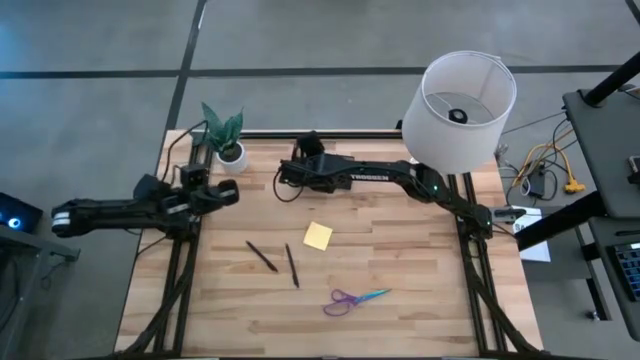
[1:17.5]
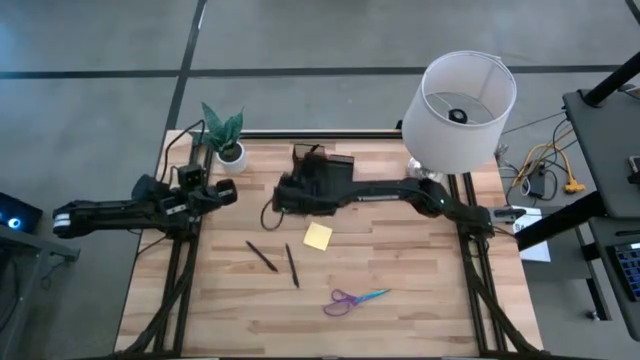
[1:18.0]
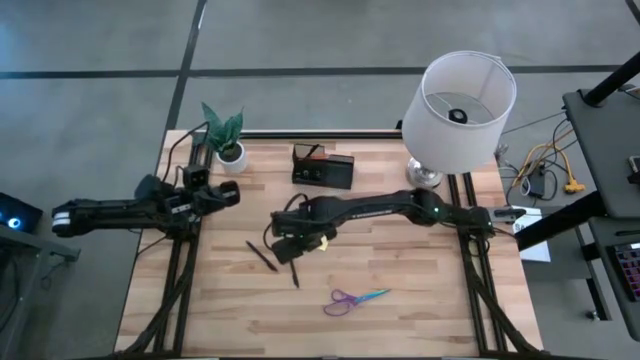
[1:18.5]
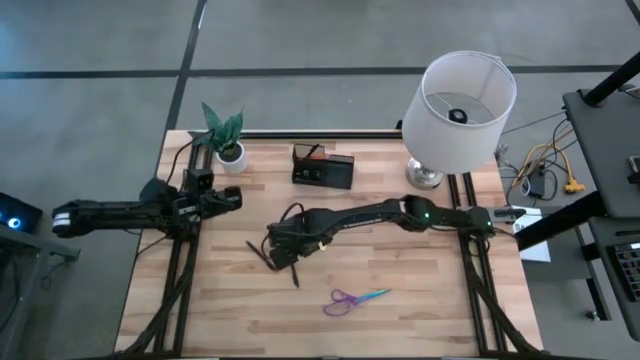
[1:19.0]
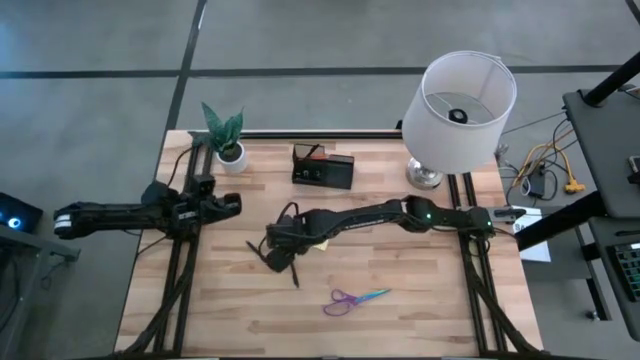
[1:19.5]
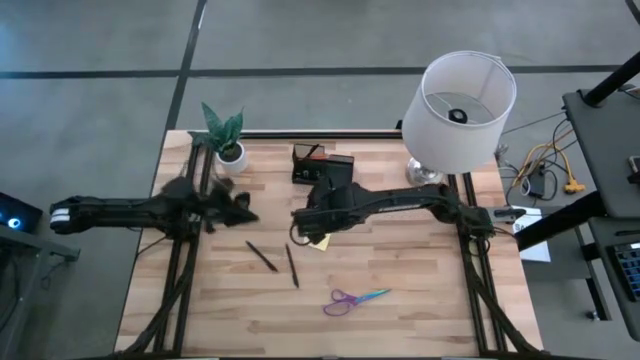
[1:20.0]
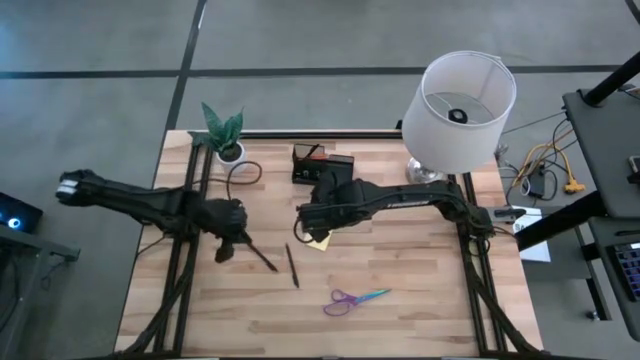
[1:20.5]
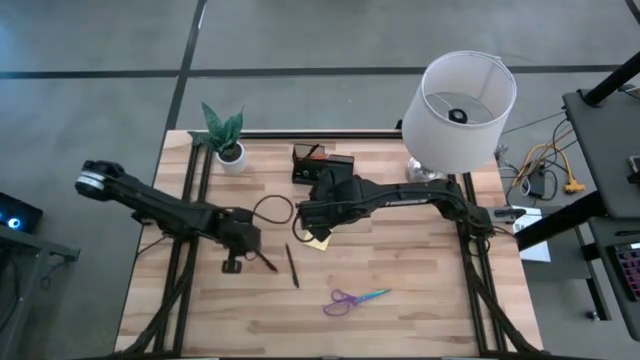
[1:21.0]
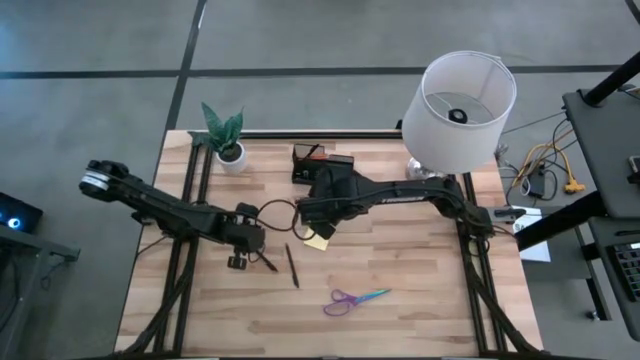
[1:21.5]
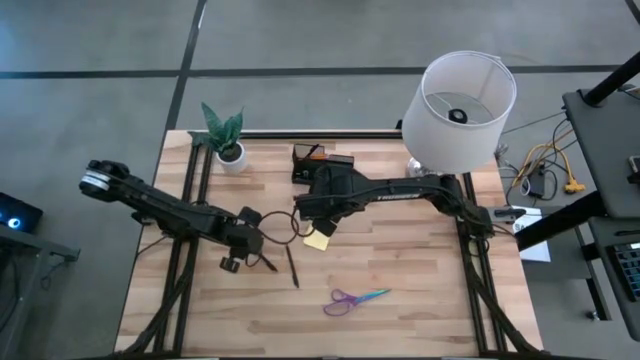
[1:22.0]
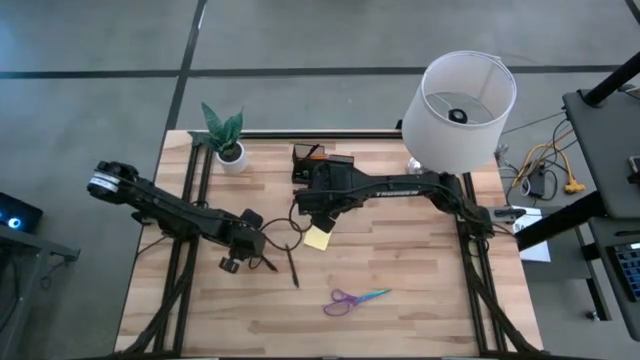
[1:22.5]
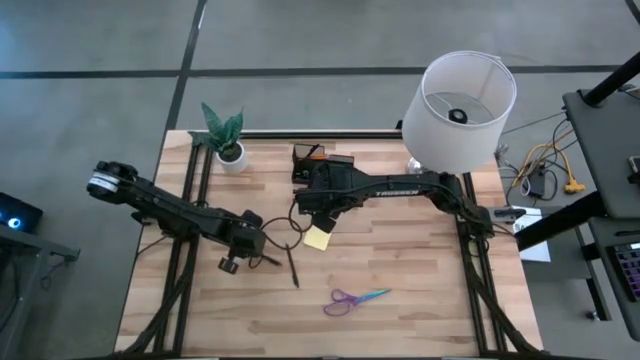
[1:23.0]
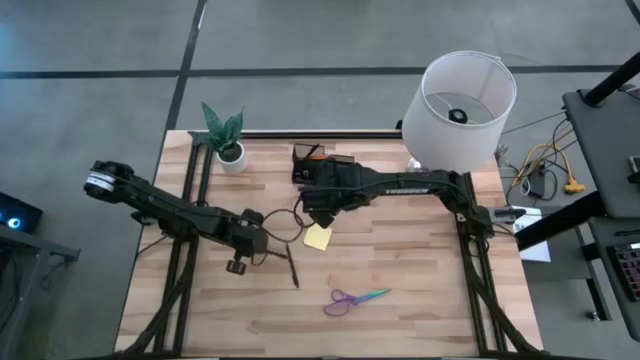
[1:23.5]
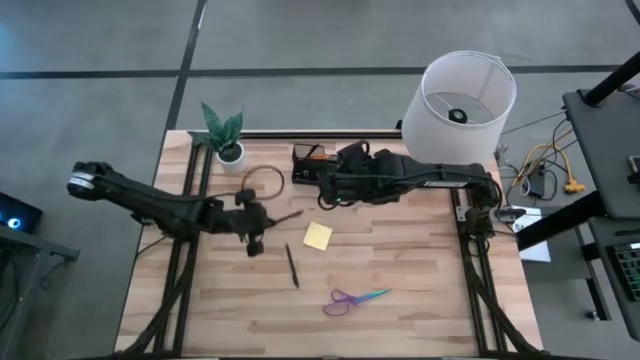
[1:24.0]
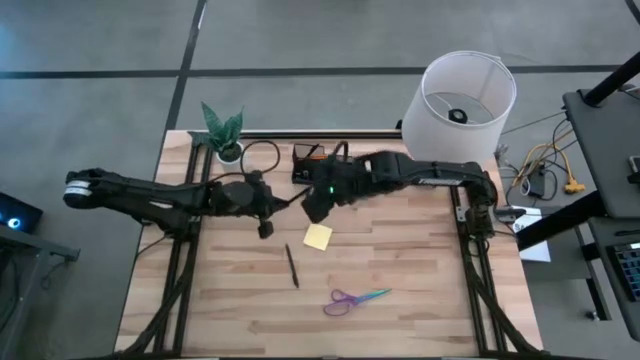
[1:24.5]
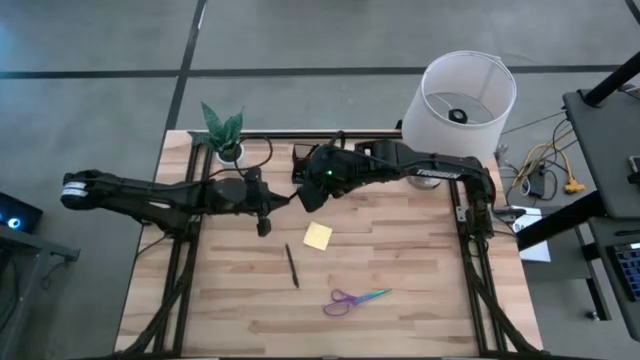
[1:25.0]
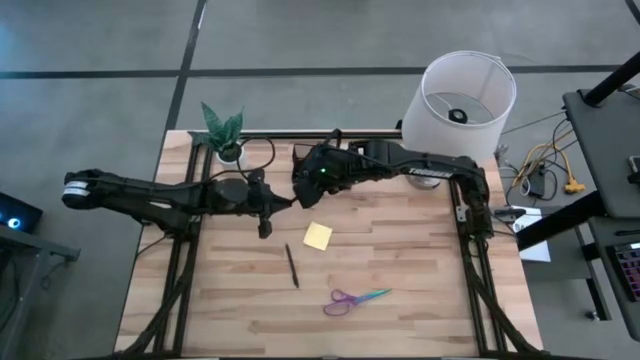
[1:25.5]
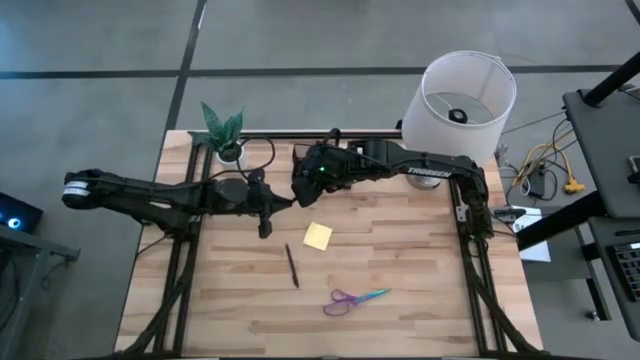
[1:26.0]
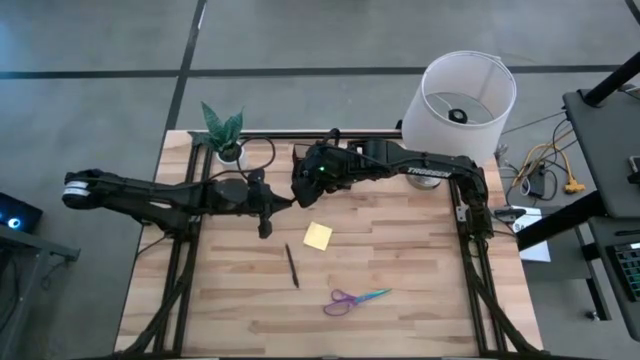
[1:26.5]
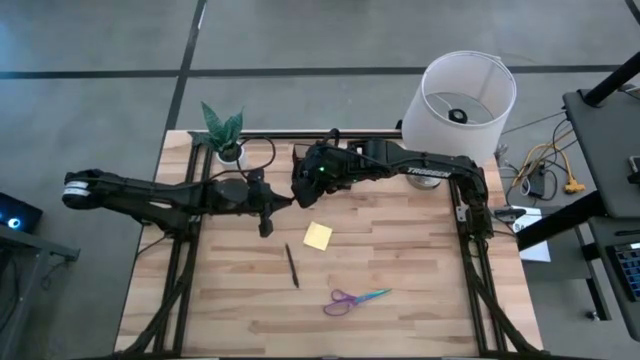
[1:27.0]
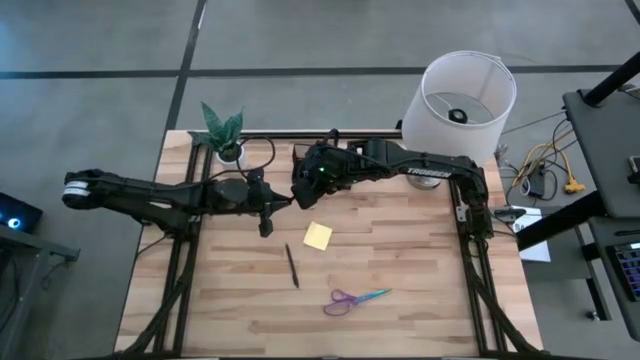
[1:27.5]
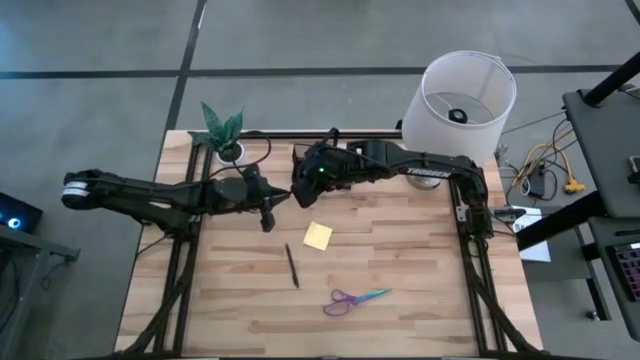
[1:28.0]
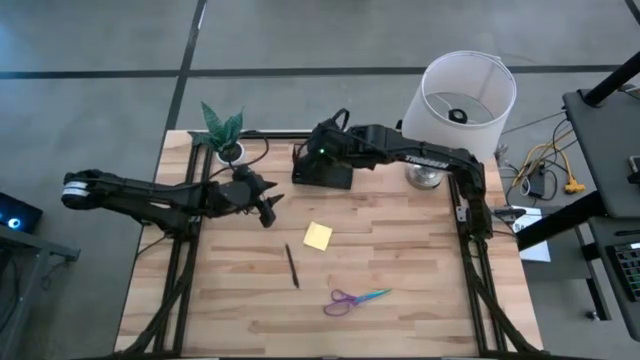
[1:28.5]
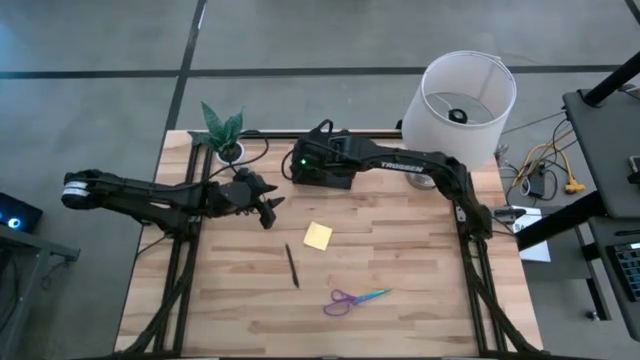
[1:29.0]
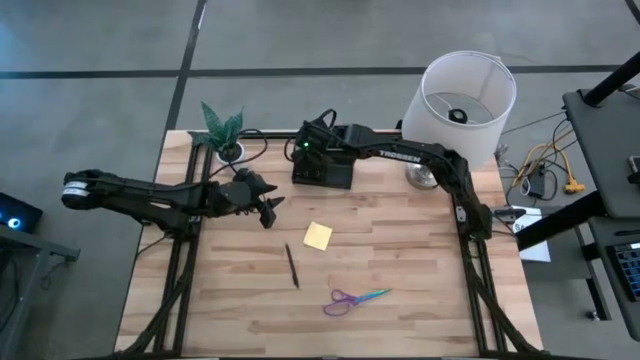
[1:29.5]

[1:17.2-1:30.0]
Task: Pick and place office supplies into organizer
Put the left black pen into the black desk organizer

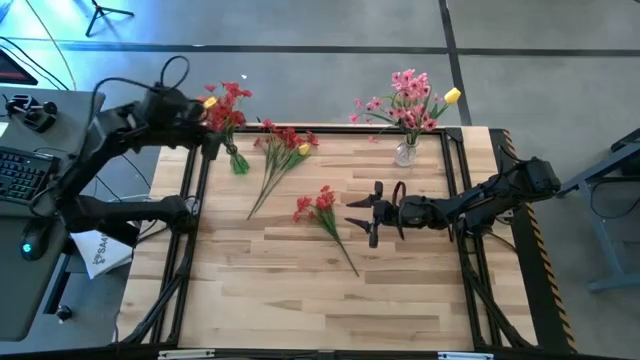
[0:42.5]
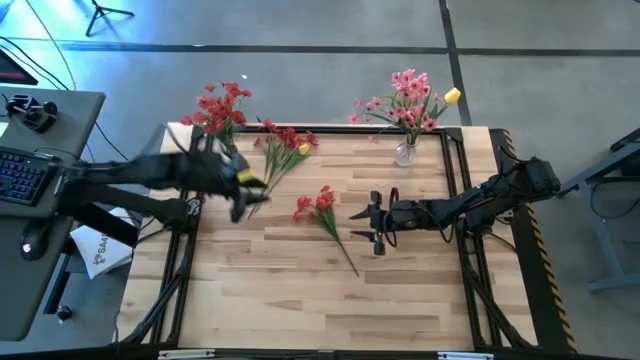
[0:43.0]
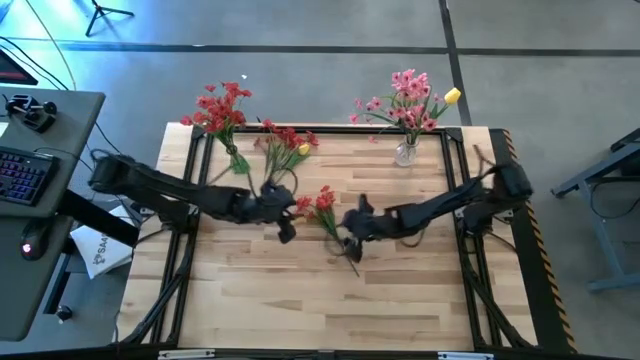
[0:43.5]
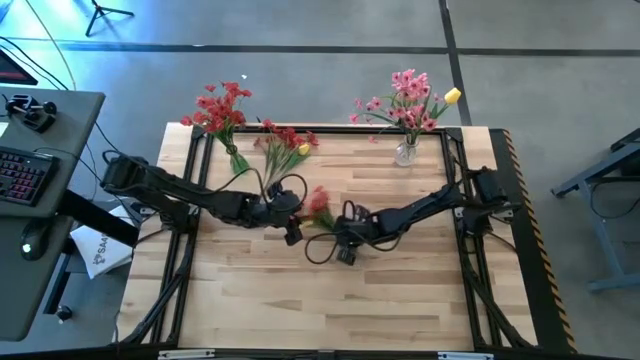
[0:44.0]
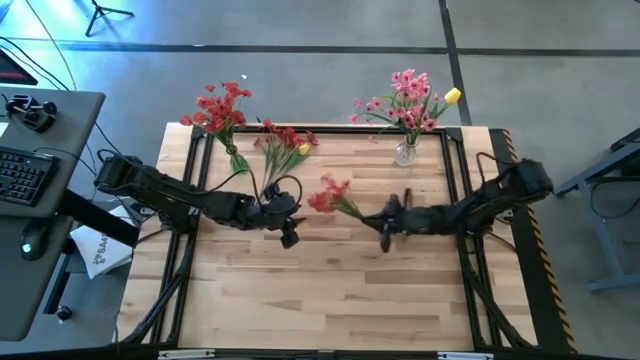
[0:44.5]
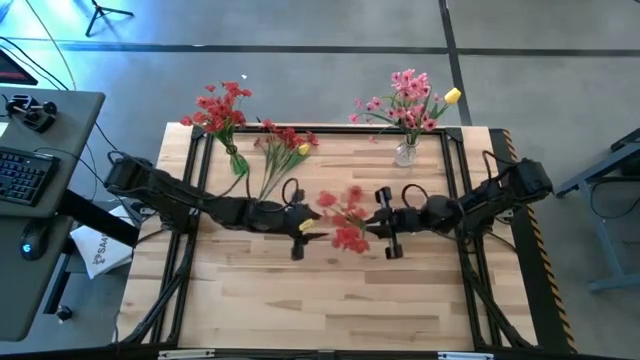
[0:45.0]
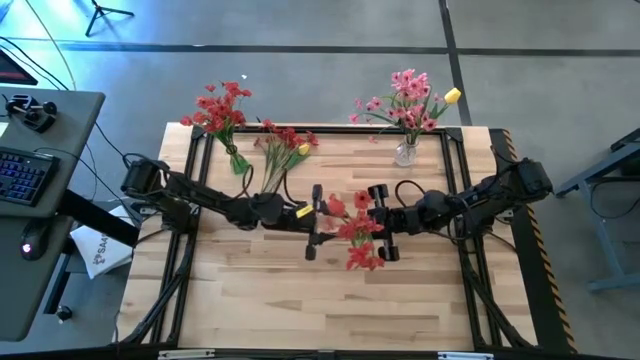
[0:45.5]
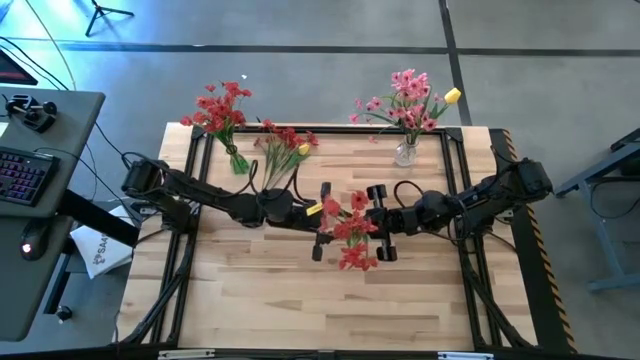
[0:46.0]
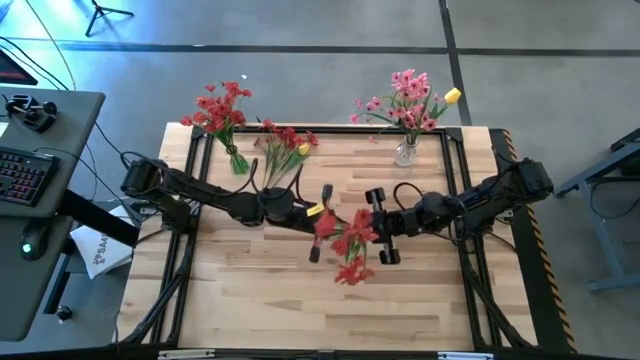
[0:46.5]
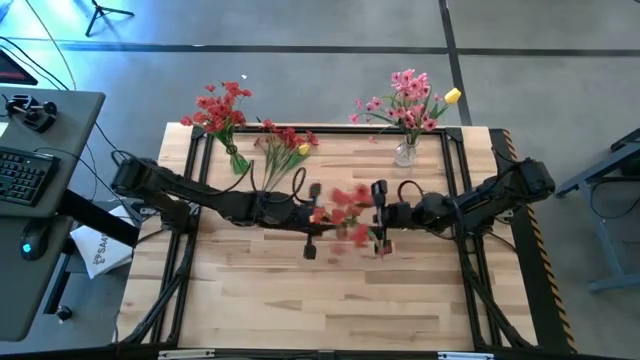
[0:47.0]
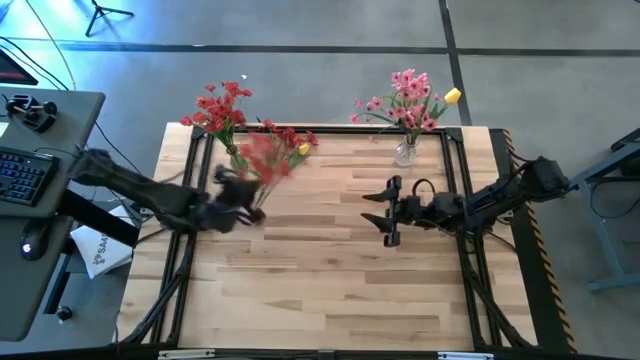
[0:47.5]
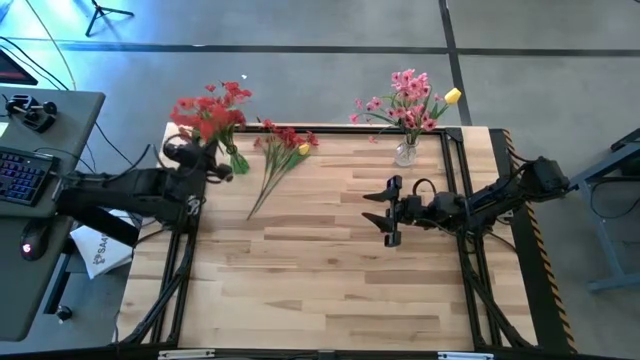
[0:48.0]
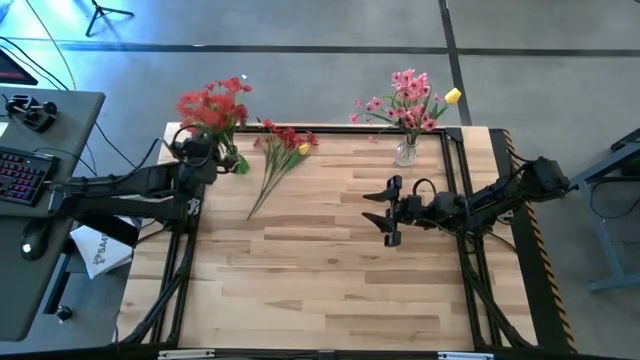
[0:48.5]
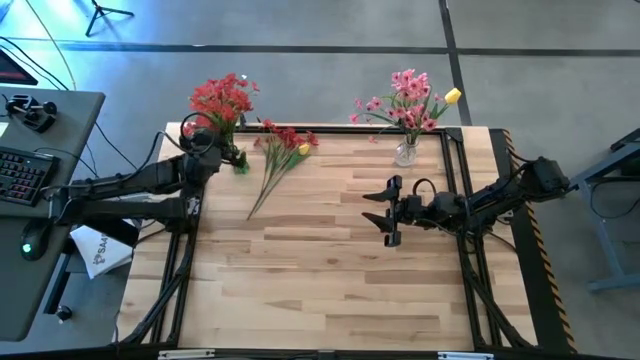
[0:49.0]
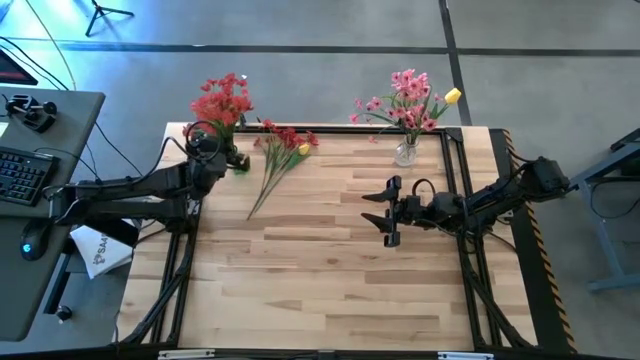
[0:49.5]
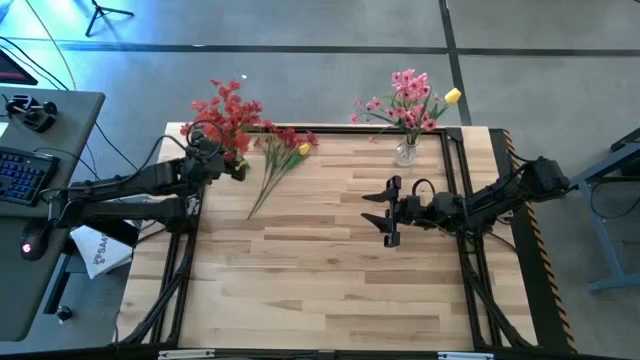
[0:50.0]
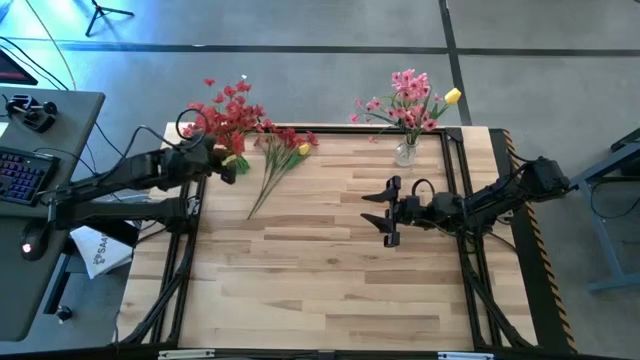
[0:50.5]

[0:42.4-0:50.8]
Task: Sort flowers into vase by color
Put the bottom red flowers into the green vase
